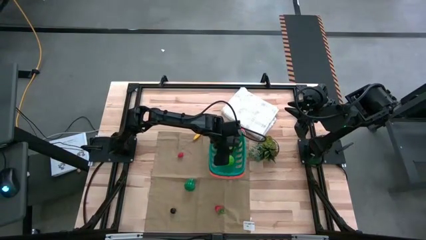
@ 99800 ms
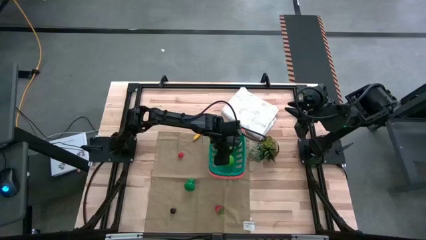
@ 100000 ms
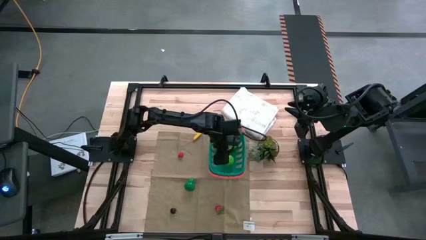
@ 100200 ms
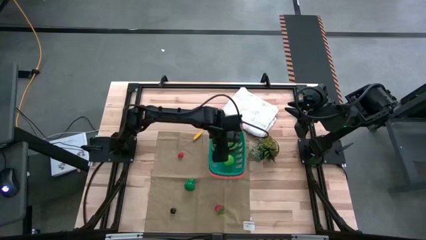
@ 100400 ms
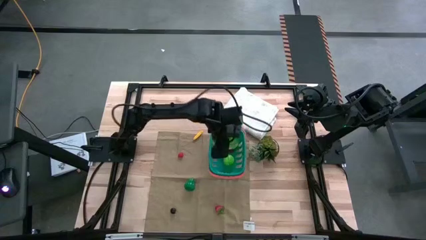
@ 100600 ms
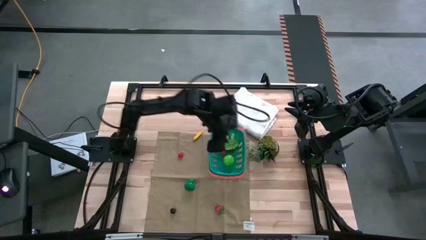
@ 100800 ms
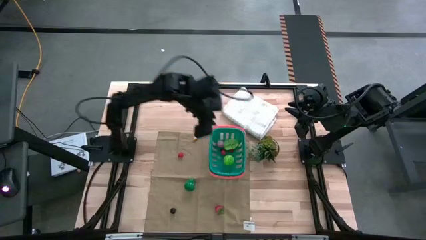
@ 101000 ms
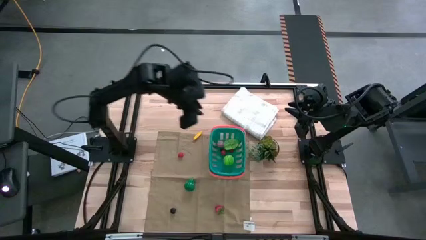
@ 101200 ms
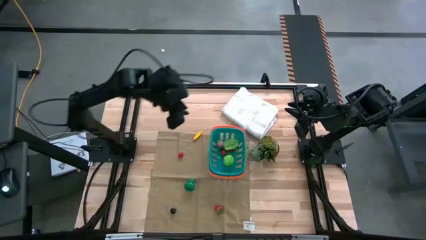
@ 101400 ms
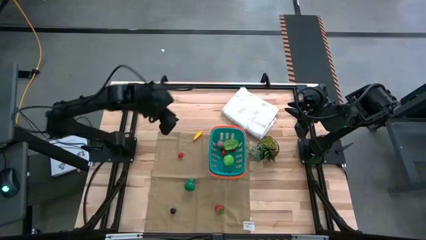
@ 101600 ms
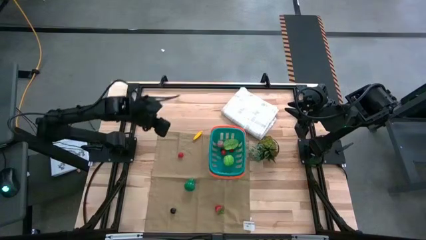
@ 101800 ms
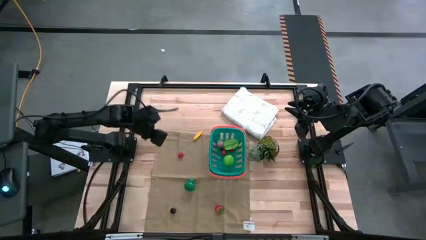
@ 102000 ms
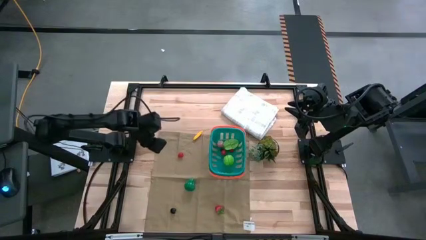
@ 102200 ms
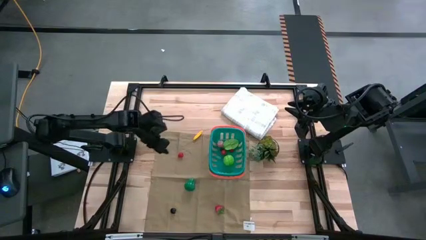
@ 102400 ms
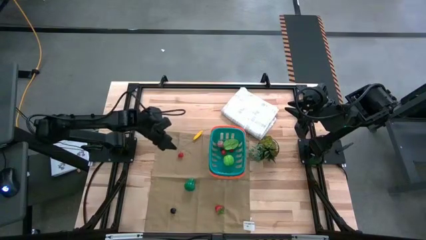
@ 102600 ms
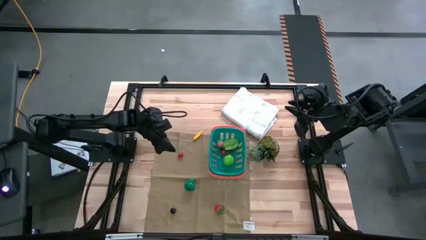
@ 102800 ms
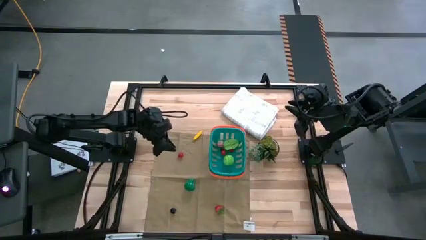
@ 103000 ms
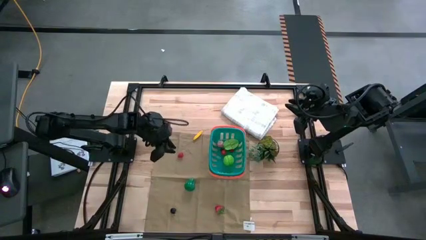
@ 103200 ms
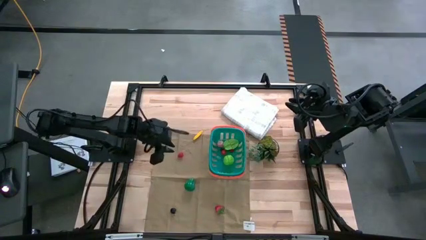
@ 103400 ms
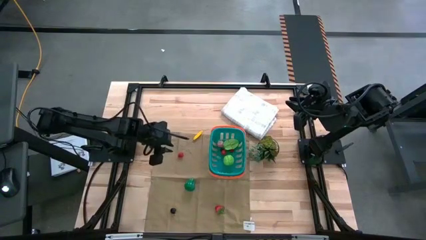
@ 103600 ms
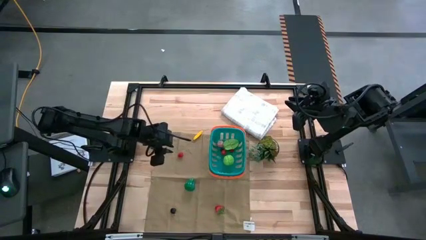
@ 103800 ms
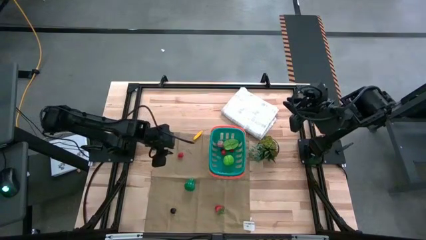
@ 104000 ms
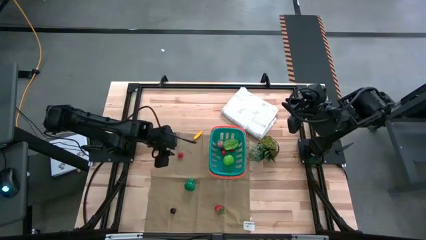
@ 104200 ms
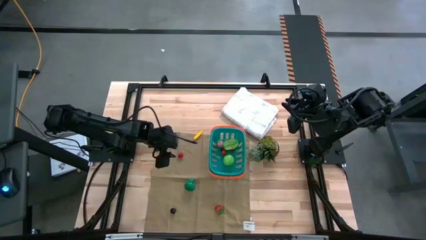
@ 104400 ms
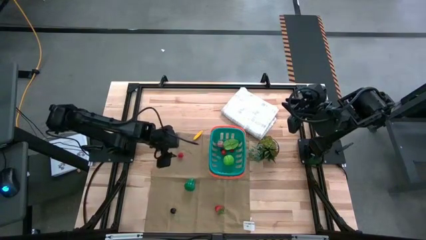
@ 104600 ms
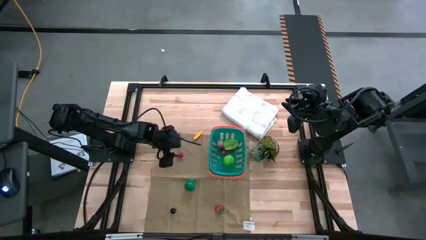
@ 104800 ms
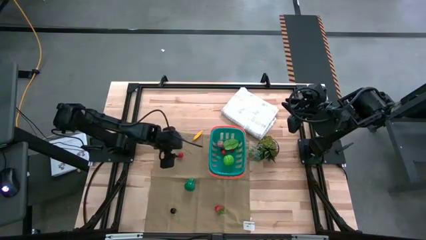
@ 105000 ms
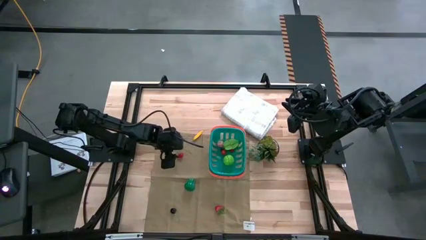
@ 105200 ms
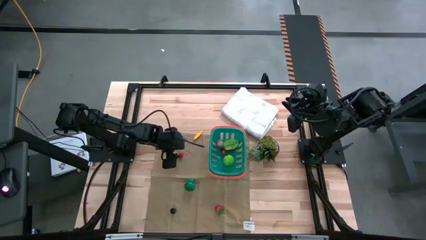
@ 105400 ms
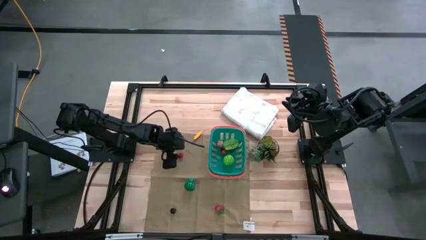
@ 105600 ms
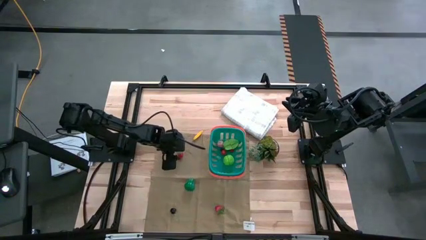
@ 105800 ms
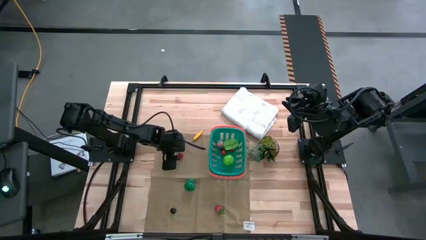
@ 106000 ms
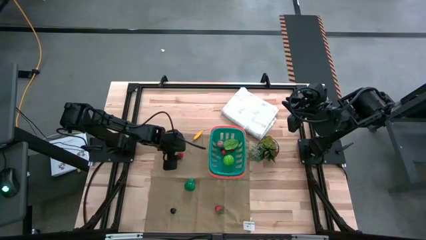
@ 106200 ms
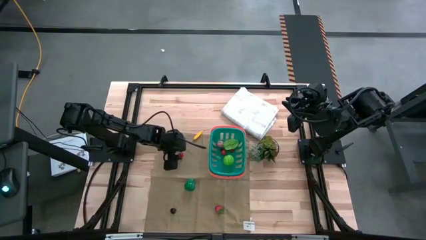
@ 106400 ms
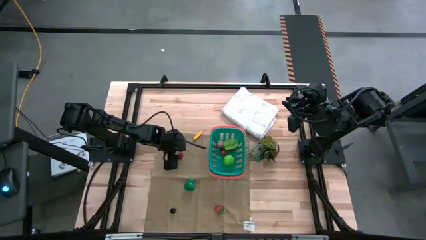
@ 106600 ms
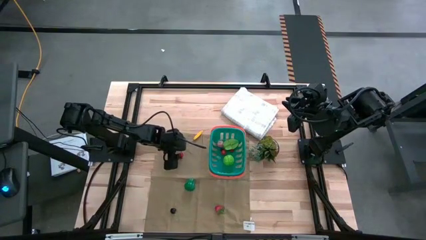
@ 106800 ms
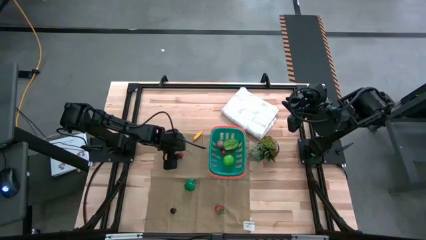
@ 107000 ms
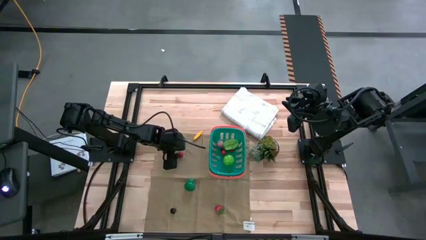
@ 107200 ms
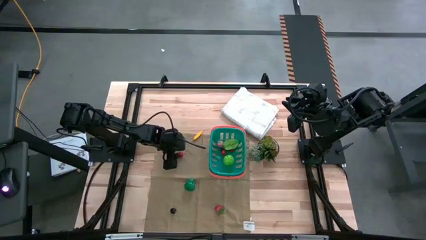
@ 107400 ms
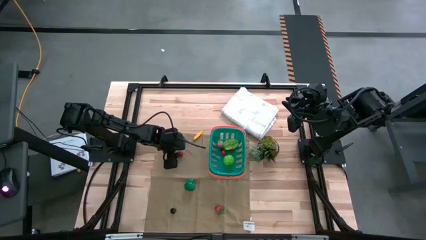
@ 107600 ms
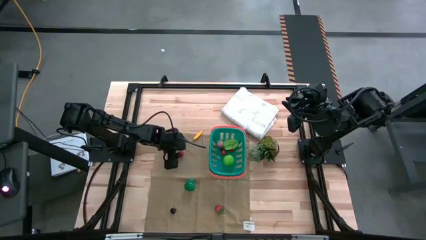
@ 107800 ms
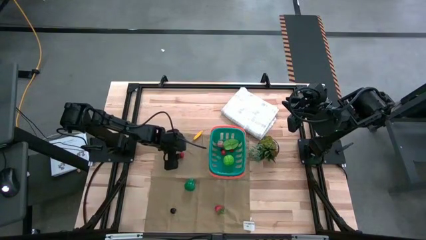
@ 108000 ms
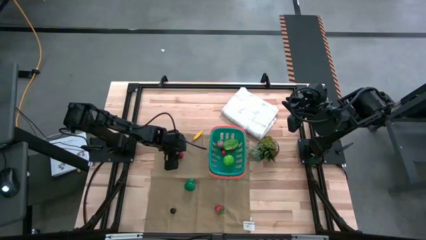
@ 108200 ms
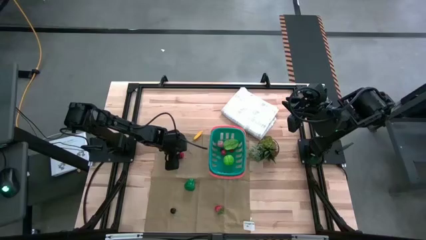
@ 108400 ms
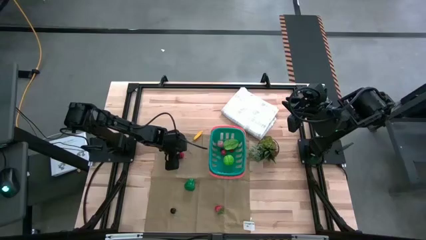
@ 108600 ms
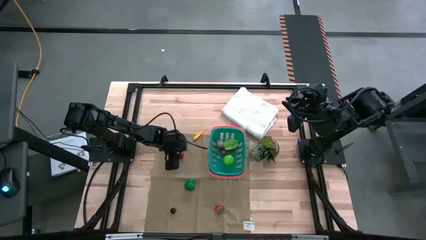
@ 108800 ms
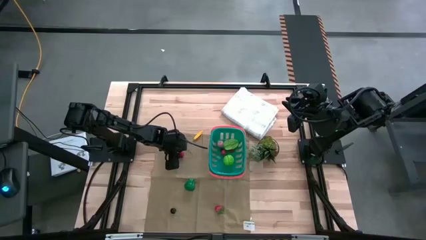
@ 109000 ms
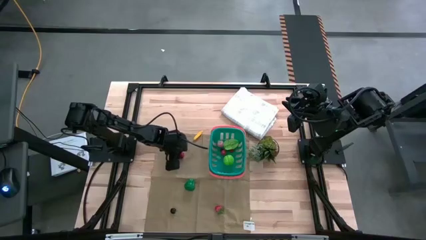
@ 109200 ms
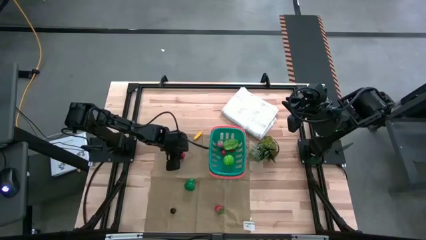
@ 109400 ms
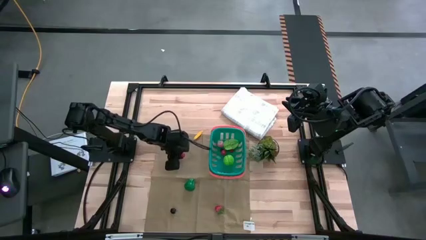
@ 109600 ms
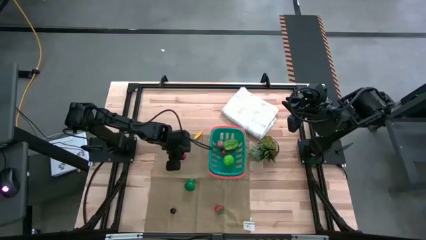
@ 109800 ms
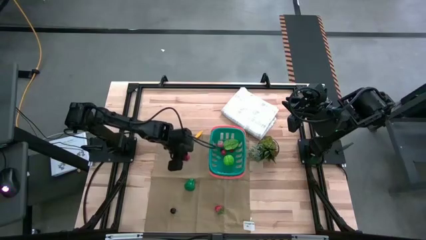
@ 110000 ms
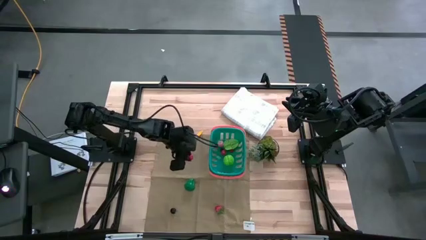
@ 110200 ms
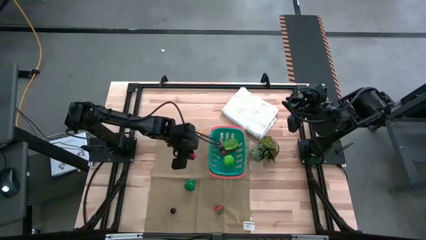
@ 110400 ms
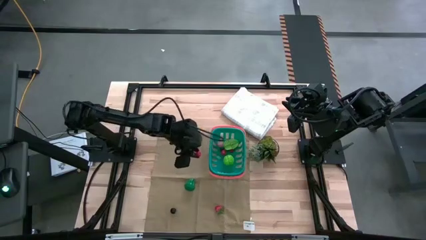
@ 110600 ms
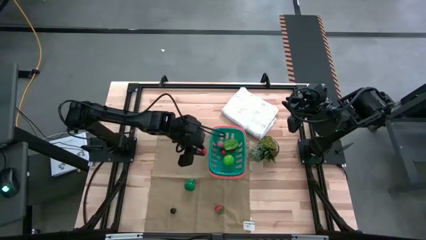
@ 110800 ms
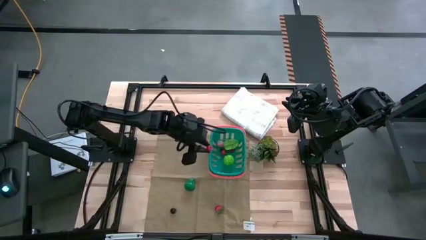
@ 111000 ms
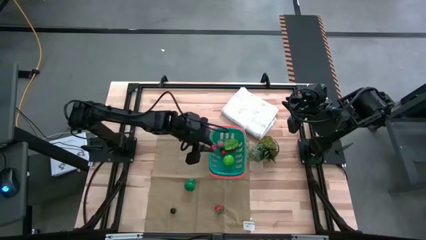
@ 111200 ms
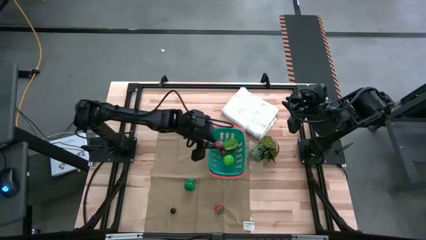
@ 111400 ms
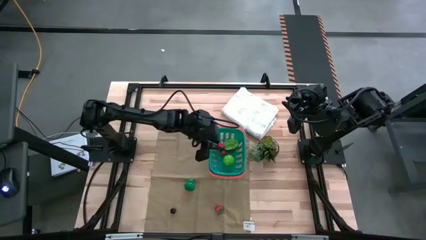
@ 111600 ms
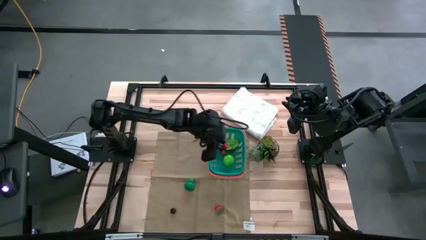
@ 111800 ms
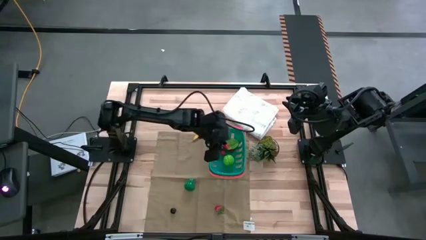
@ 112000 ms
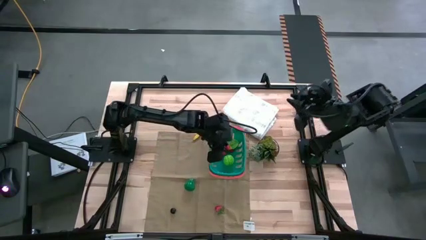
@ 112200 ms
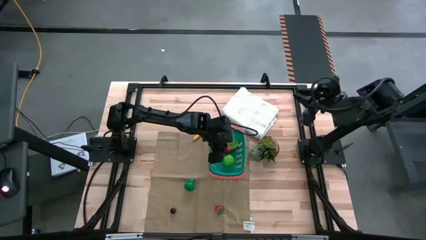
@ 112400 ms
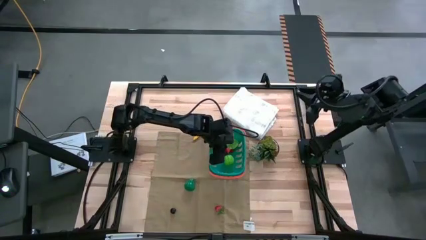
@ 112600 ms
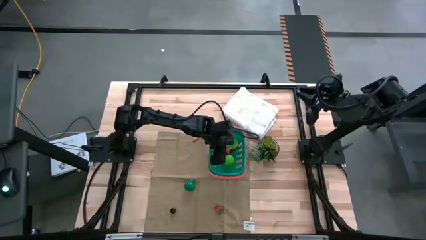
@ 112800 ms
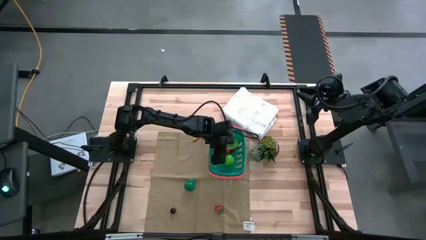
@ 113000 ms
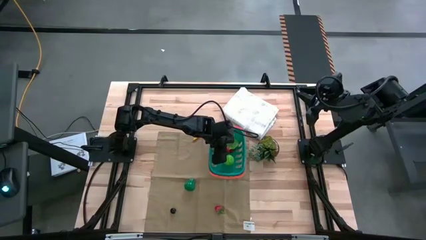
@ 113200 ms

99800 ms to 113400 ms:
Task: Pick and placing Produce into tupperware
Put the red raspberry into the blue basket
